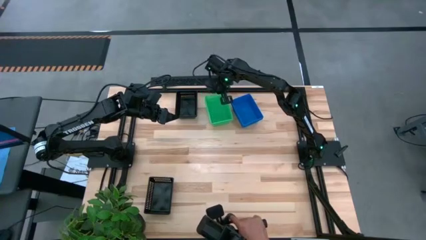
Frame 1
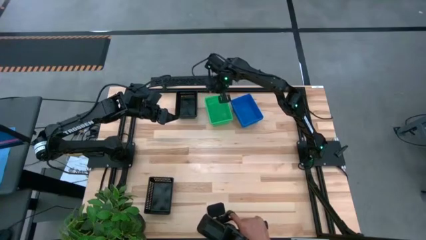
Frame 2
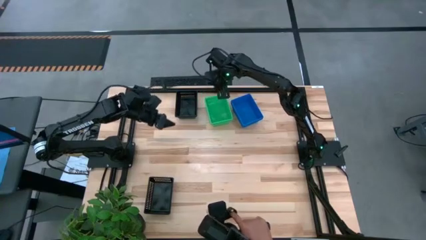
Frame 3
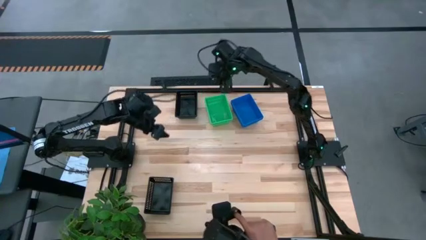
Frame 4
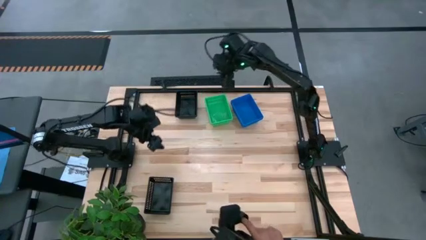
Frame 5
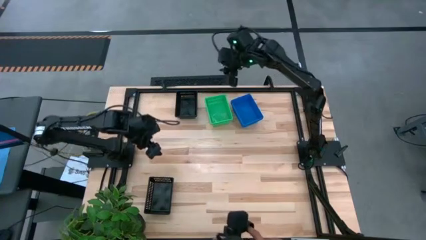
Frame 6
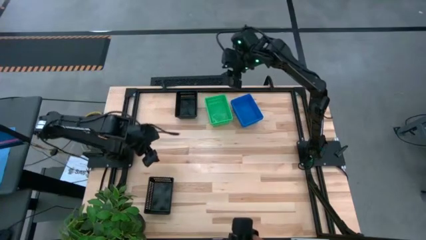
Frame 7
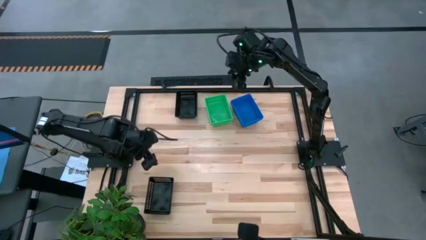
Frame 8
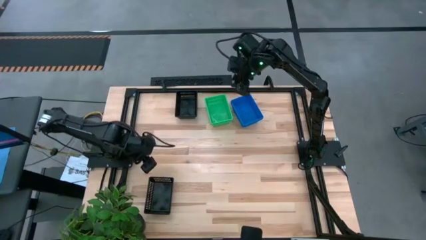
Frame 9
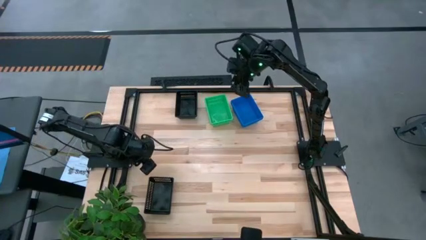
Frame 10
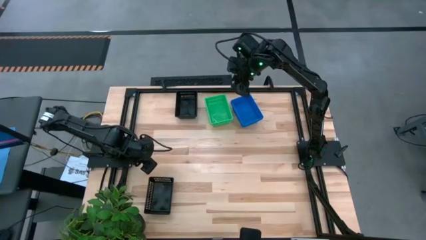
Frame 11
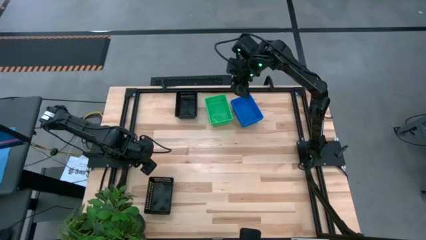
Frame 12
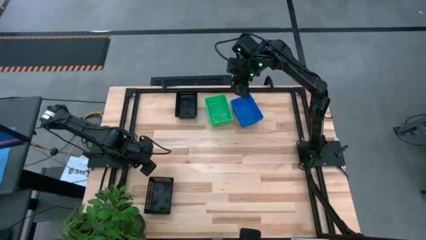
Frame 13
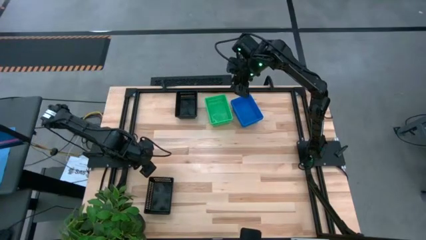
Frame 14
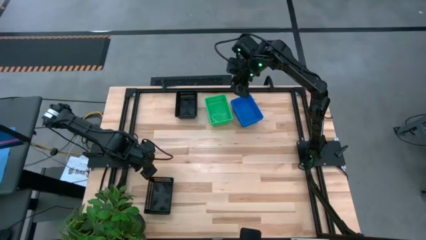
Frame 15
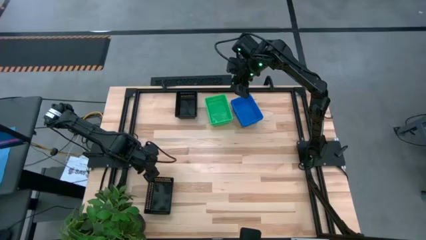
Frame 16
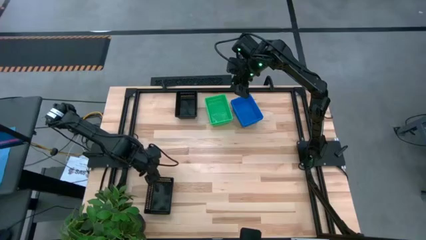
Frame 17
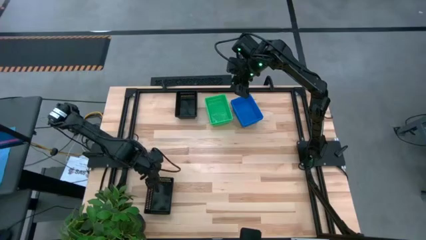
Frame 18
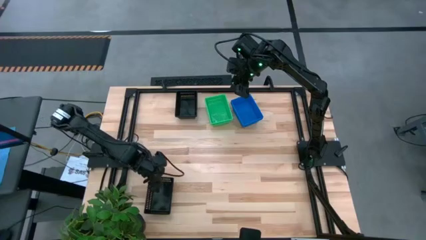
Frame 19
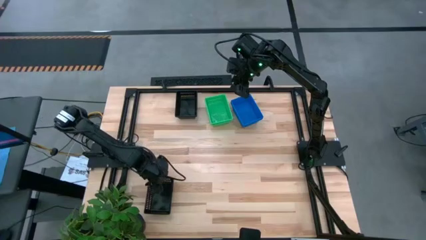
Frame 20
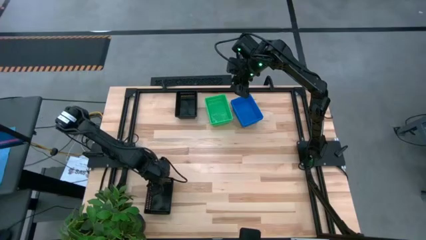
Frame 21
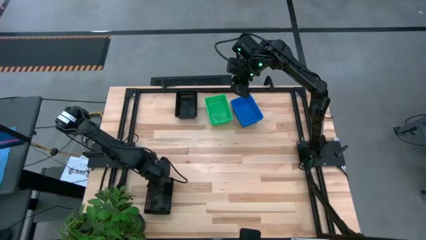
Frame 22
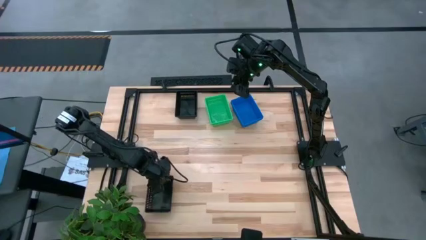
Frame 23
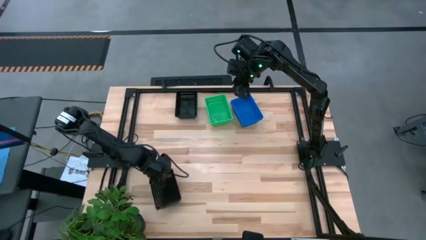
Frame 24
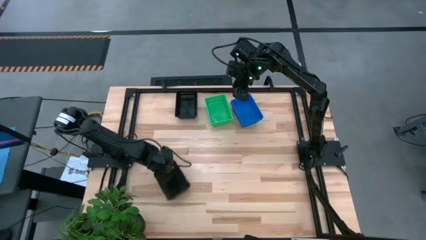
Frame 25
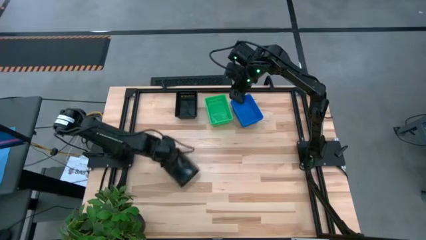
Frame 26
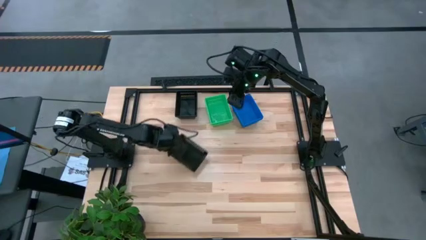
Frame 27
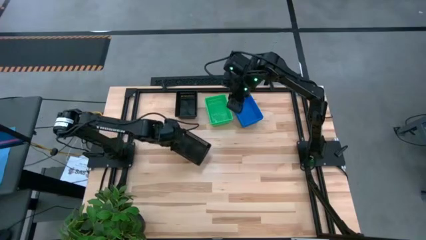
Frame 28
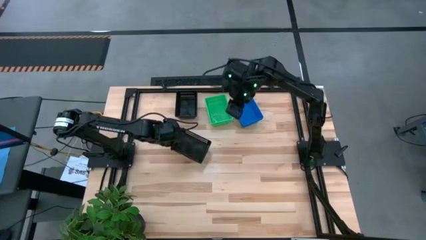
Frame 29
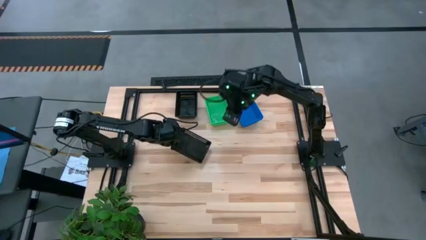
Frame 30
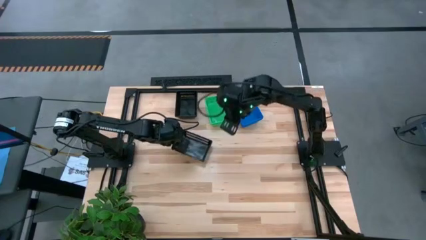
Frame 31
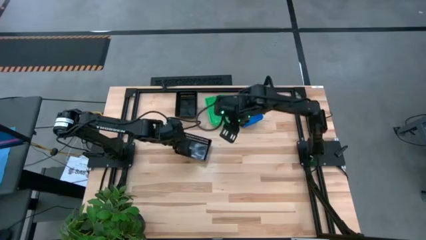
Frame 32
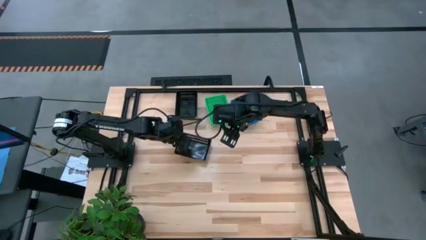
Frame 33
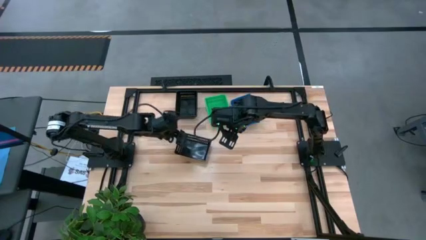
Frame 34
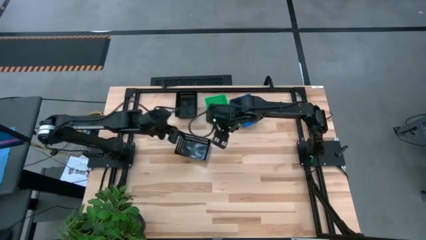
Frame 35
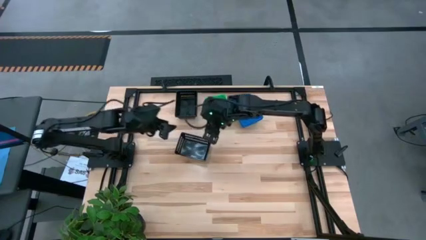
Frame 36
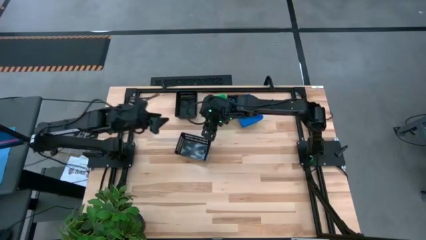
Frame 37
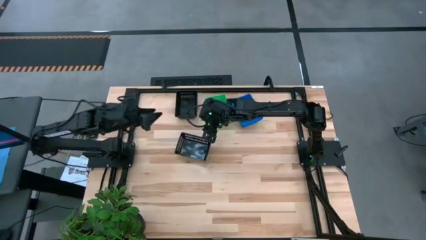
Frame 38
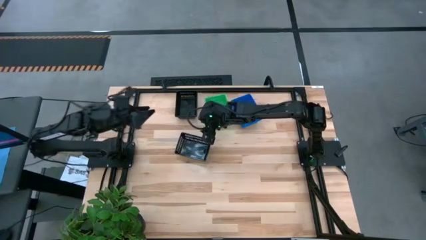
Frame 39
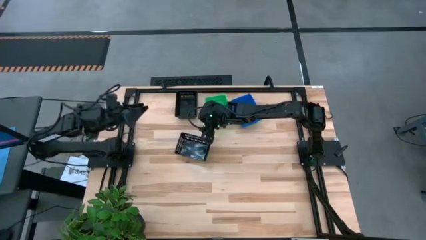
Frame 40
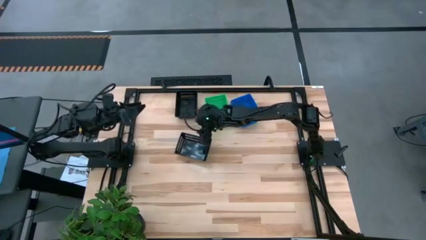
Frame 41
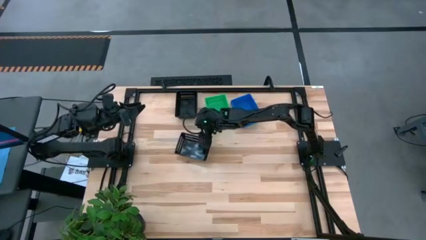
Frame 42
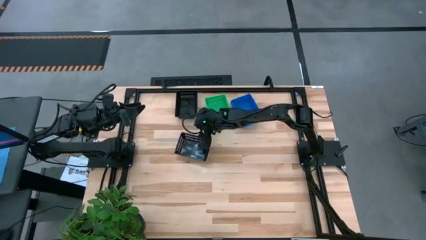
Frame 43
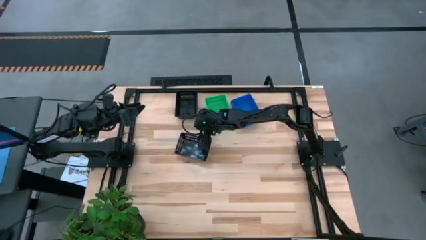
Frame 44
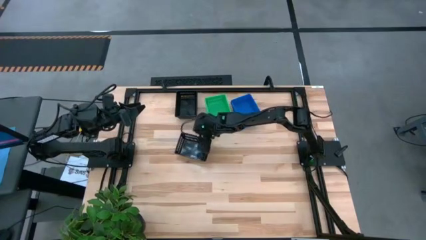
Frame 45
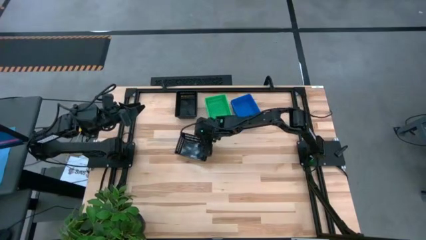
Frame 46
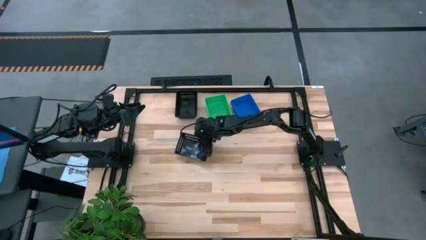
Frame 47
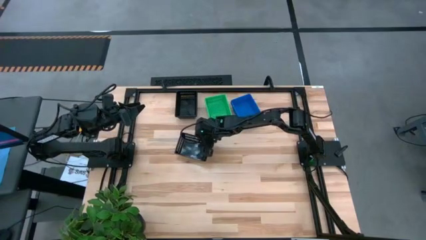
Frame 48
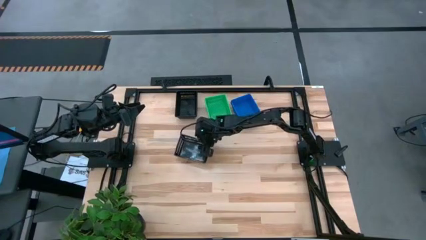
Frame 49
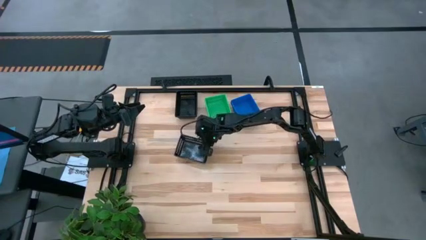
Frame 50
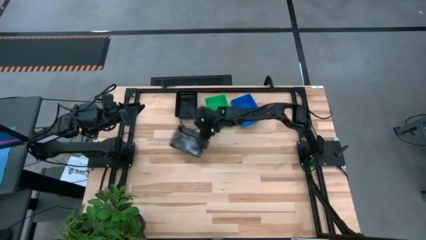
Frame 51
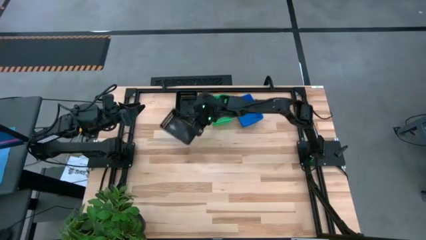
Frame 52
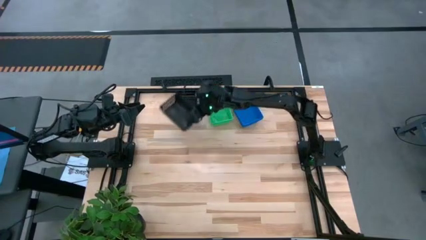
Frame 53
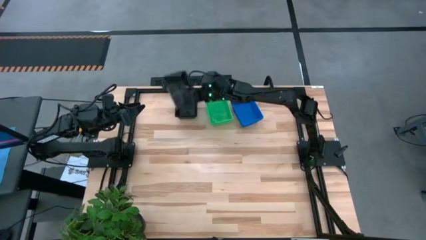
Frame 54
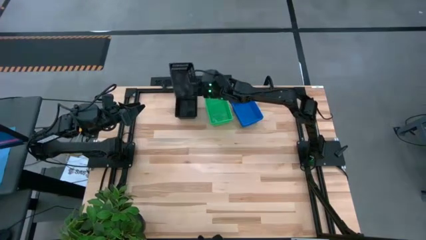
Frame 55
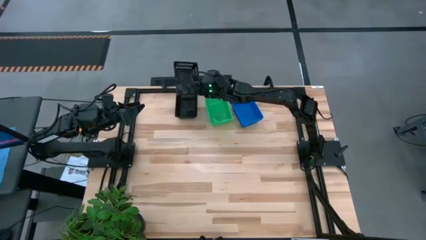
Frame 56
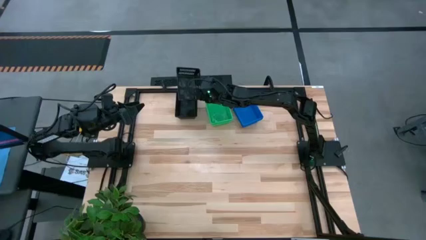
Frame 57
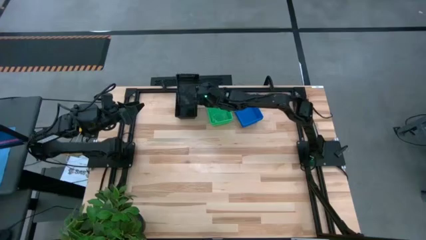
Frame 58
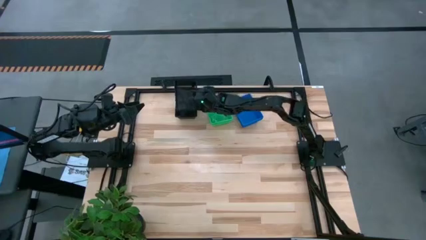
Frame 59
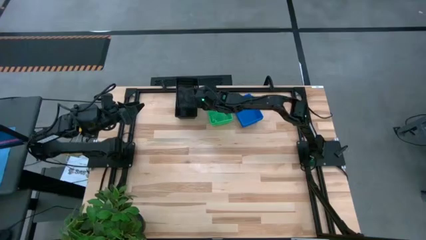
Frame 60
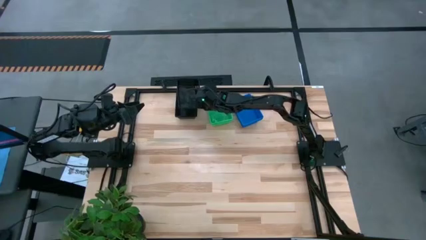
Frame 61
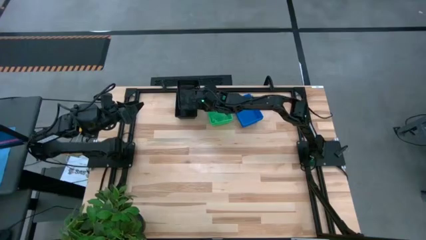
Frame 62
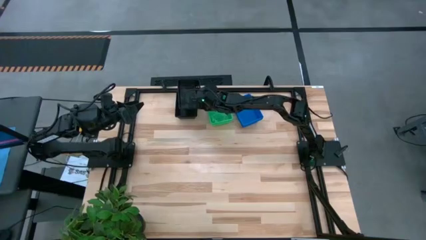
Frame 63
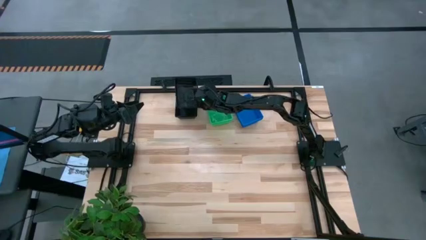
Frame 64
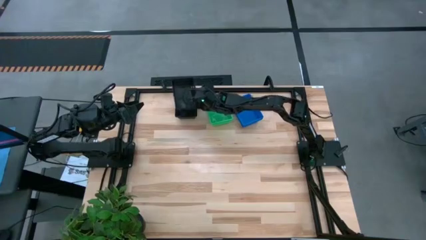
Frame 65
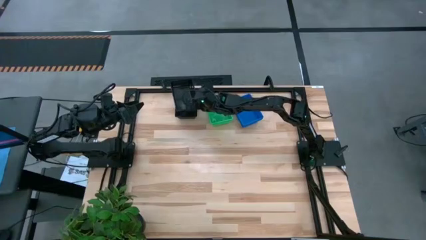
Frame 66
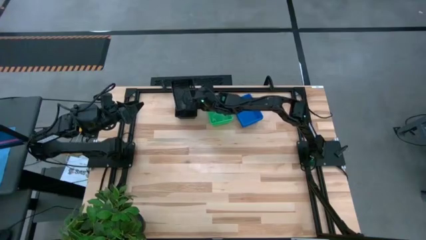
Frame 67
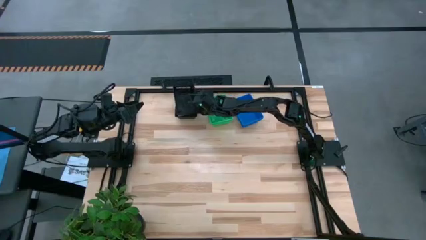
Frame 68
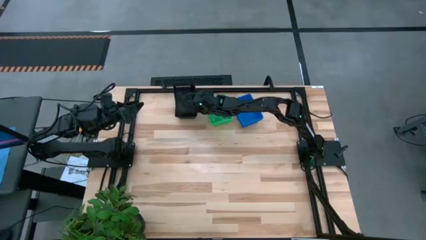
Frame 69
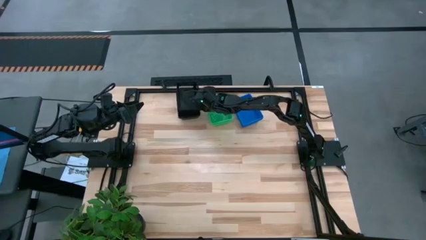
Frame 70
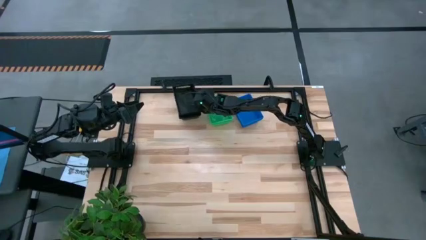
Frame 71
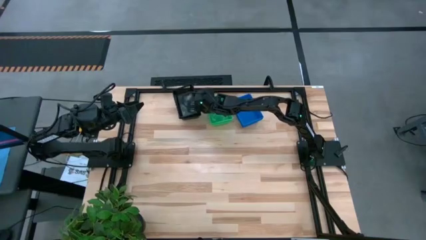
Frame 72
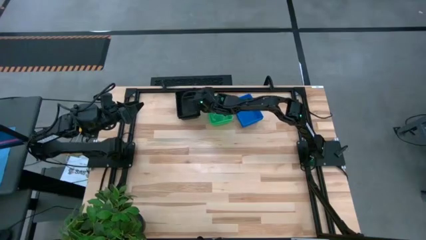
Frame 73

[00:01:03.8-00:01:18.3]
Stack the bottom black bin on top of the top black bins
